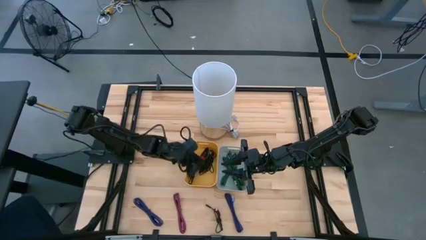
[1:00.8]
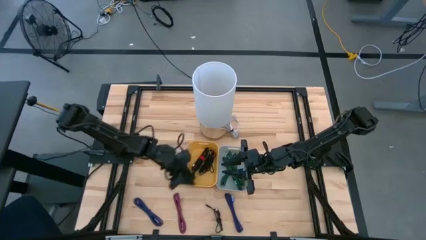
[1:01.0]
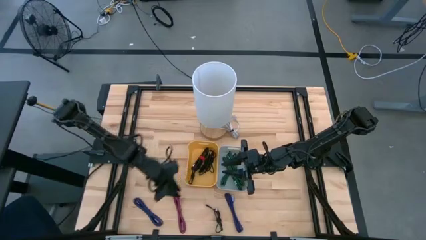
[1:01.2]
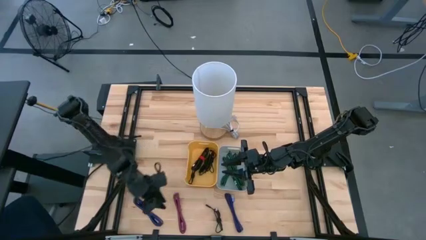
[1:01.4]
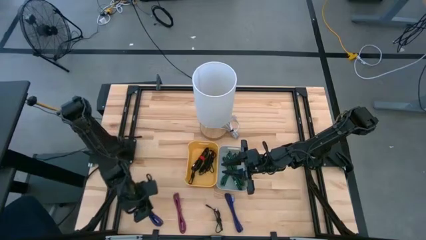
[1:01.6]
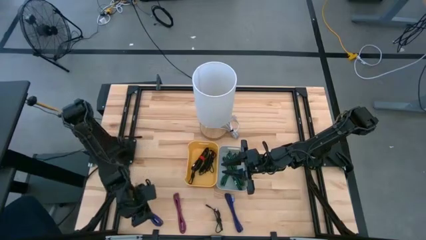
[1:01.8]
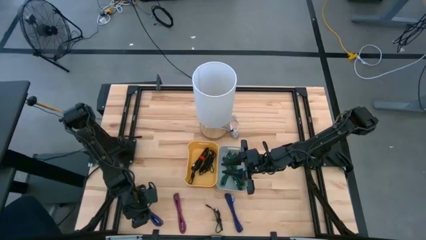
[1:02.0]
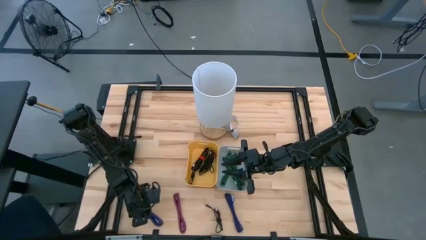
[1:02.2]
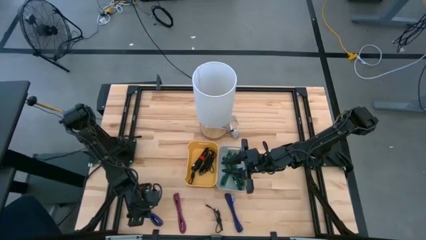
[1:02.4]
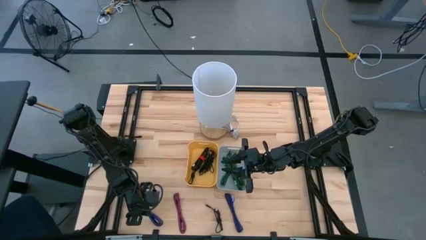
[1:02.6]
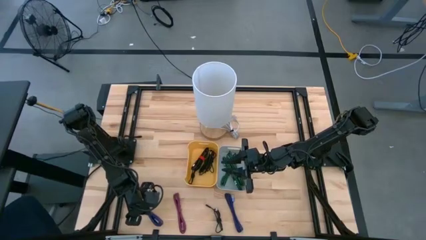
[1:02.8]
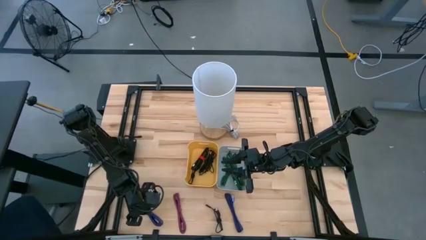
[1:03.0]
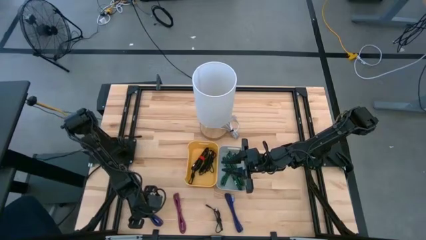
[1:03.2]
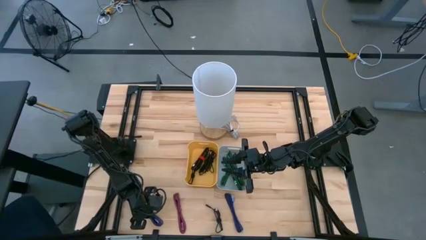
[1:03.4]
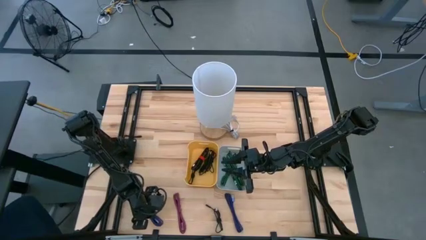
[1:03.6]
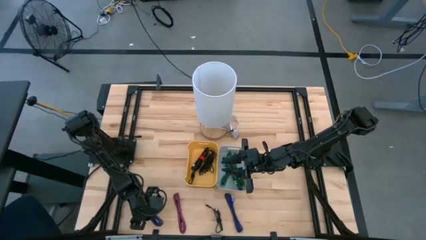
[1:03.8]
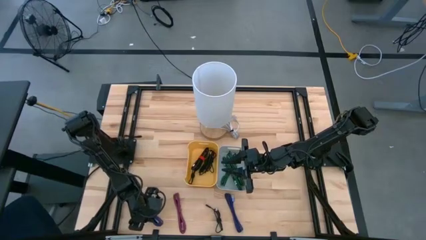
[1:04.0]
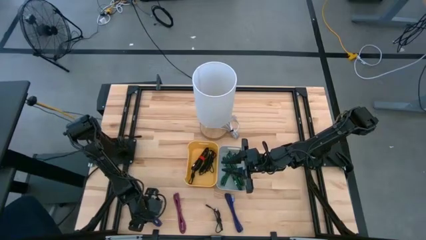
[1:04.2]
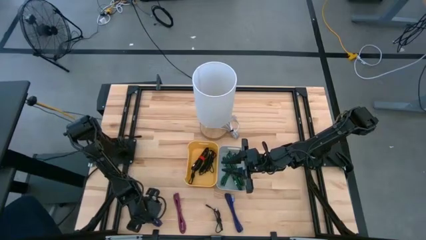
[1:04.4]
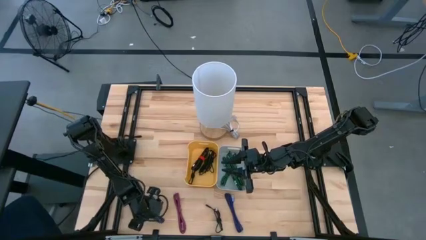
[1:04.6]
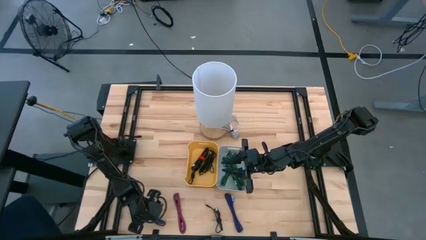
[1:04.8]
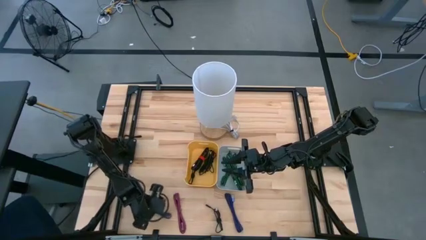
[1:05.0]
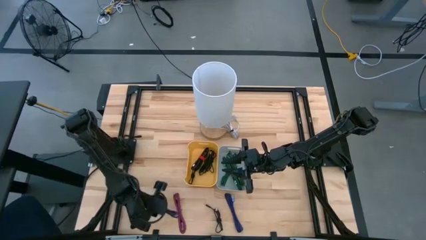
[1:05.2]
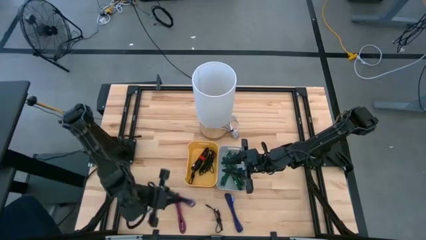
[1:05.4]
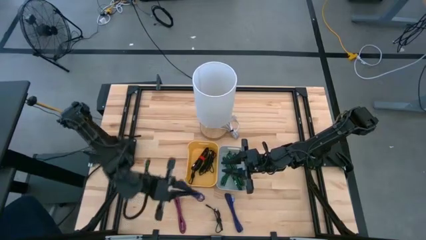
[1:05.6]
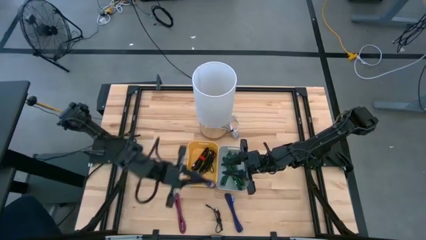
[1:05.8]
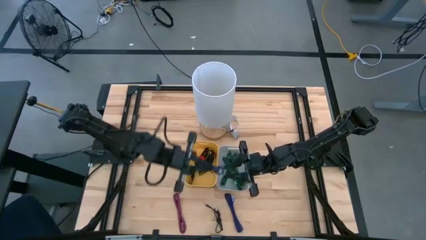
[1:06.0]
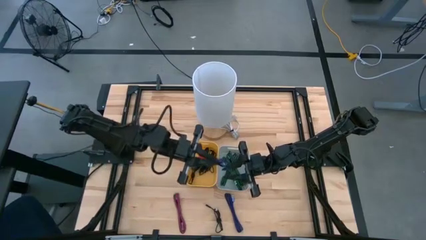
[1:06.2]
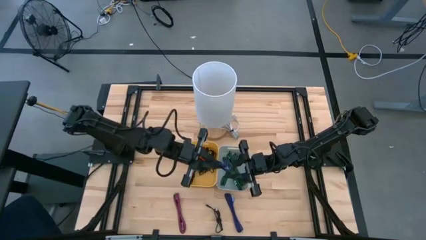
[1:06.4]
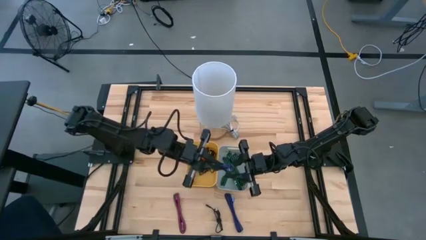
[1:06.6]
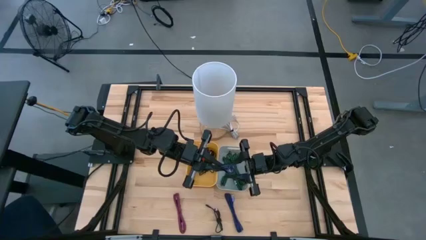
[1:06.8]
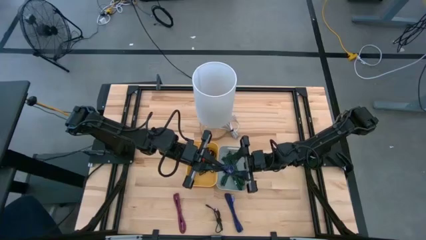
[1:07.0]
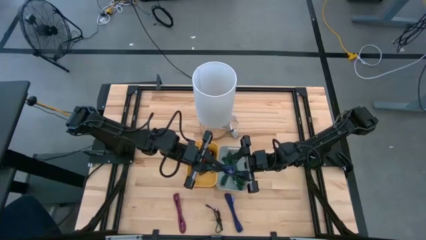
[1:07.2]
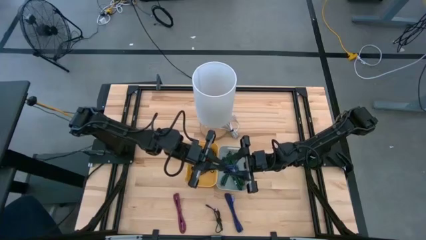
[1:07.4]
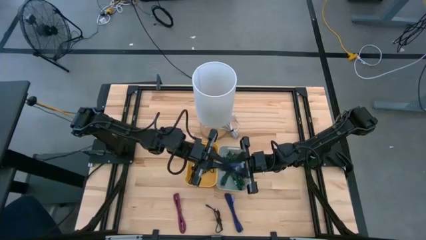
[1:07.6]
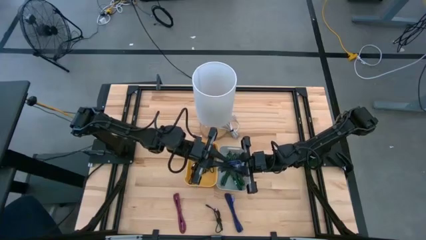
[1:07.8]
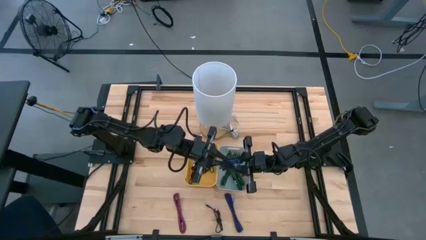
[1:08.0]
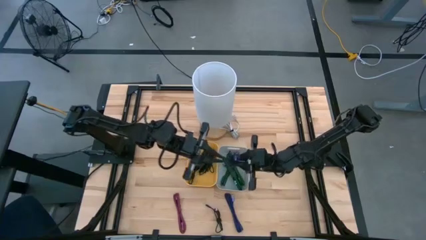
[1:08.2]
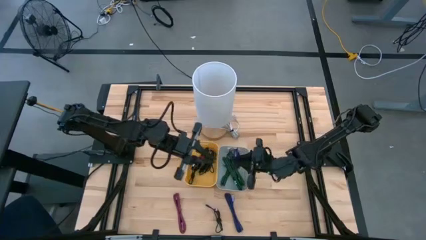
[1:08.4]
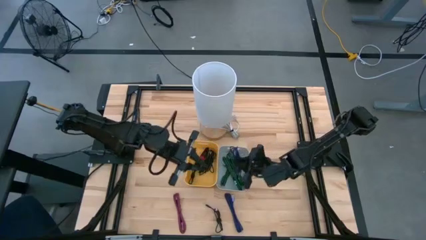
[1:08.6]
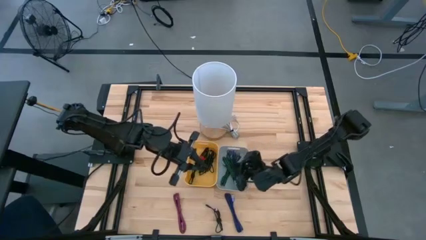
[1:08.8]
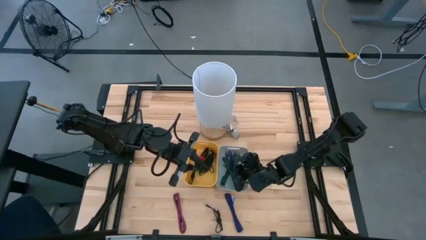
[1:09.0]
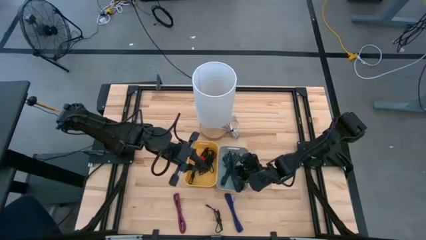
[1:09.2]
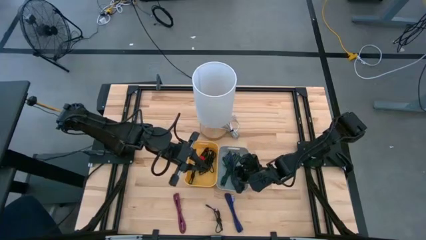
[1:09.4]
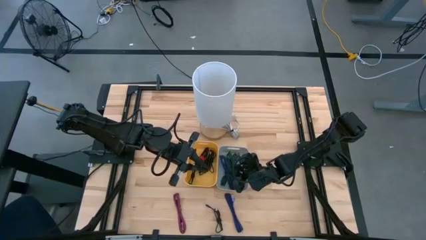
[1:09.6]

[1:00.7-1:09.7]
Task: Pick & Place USB Port
Put the left violet and white charger cable into the gray bin

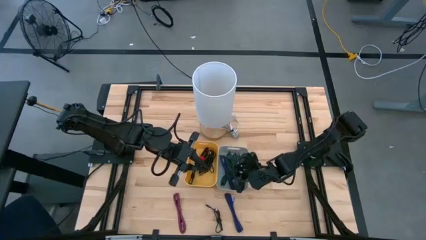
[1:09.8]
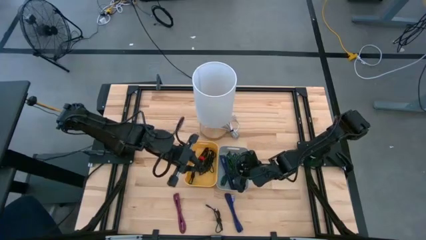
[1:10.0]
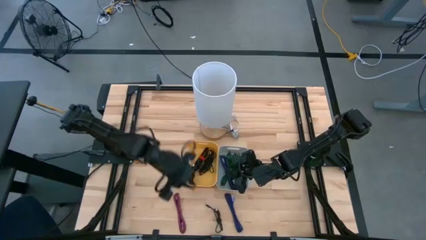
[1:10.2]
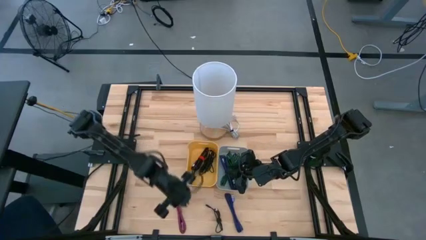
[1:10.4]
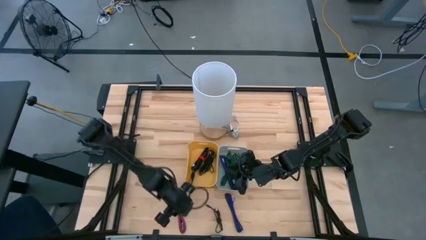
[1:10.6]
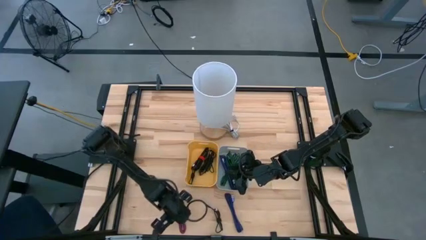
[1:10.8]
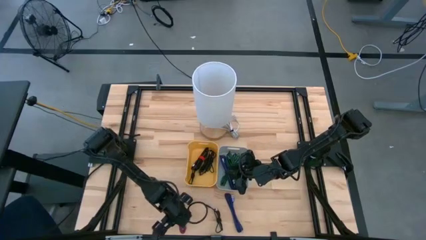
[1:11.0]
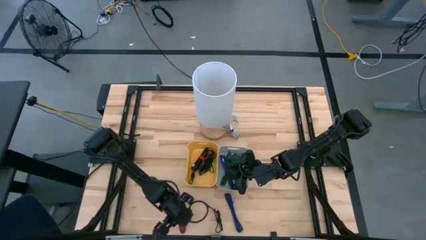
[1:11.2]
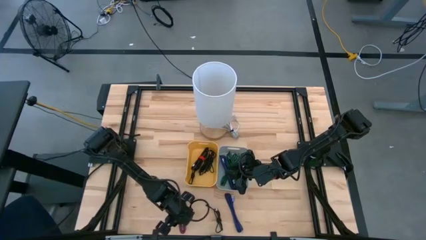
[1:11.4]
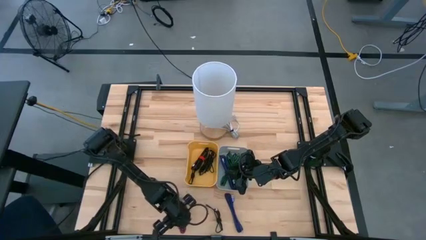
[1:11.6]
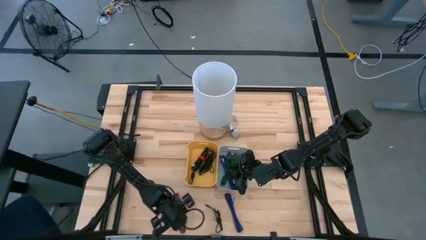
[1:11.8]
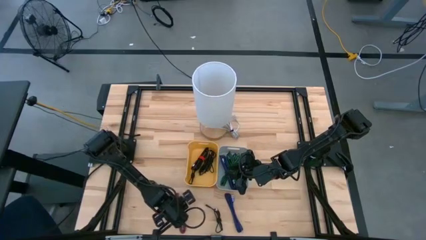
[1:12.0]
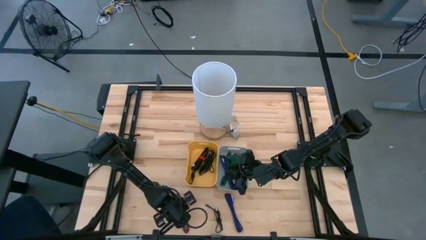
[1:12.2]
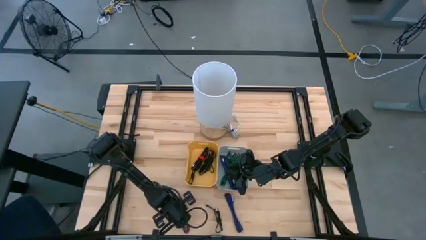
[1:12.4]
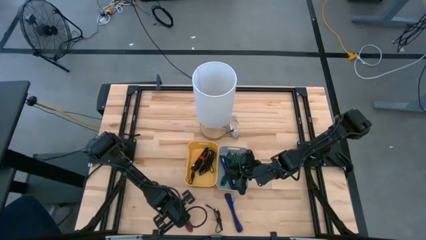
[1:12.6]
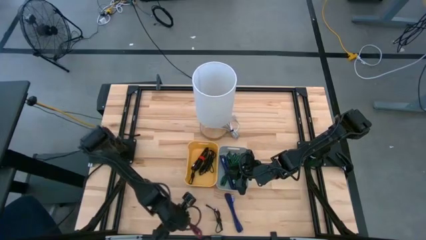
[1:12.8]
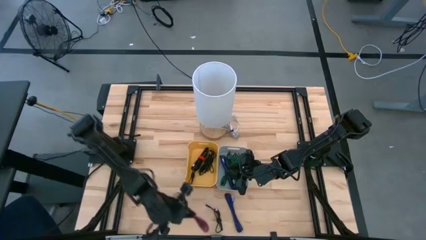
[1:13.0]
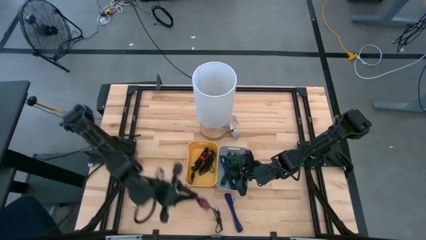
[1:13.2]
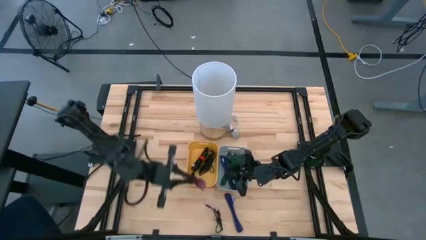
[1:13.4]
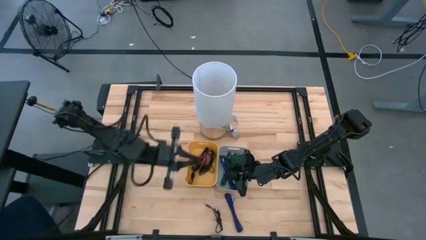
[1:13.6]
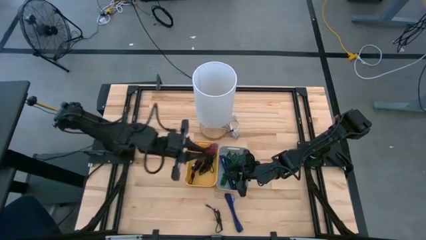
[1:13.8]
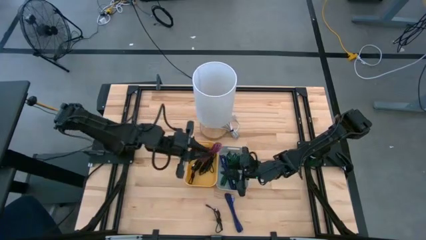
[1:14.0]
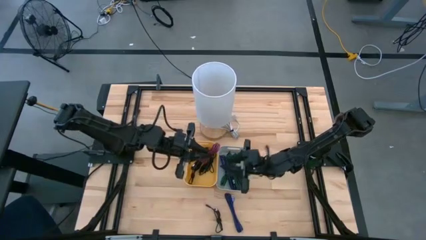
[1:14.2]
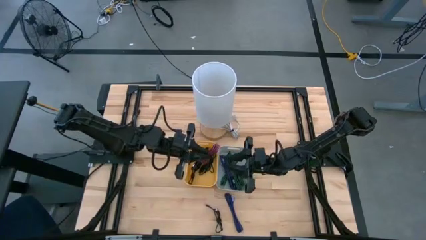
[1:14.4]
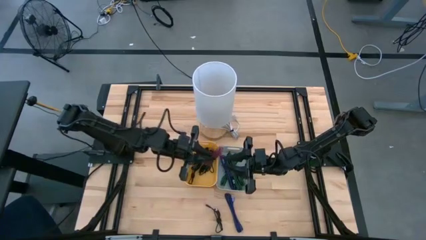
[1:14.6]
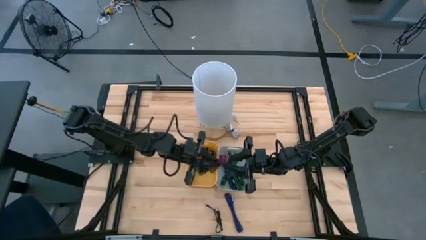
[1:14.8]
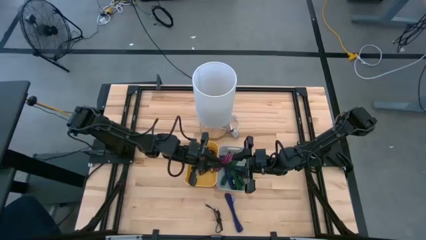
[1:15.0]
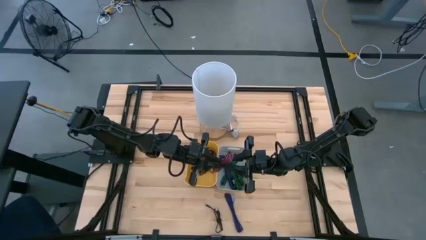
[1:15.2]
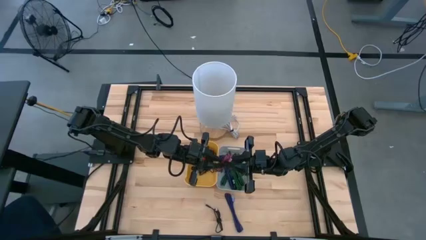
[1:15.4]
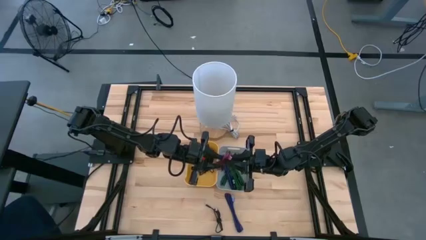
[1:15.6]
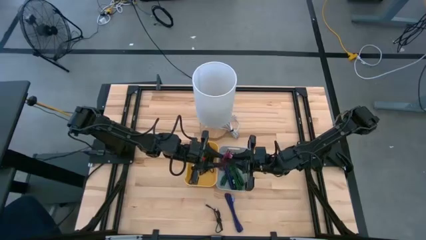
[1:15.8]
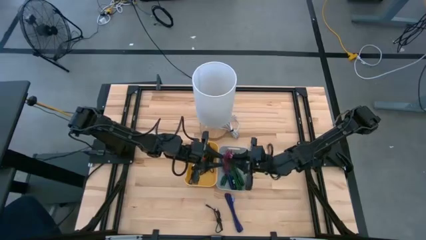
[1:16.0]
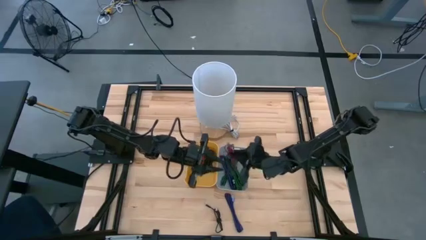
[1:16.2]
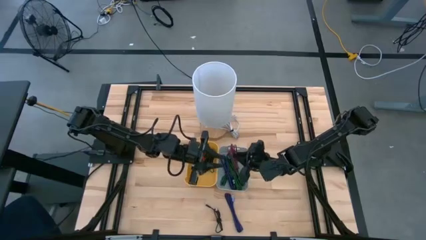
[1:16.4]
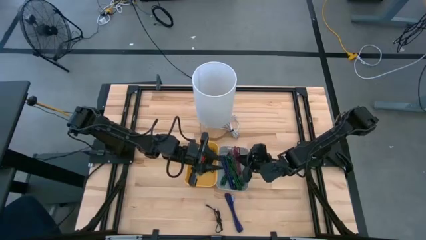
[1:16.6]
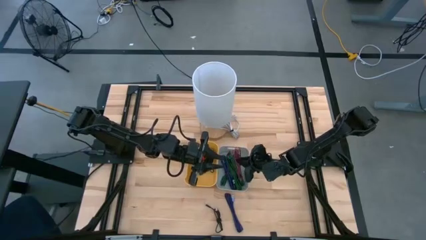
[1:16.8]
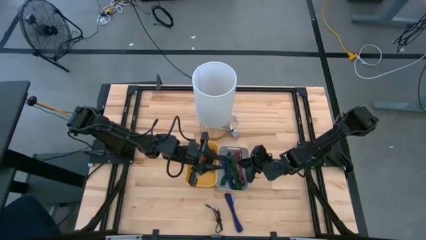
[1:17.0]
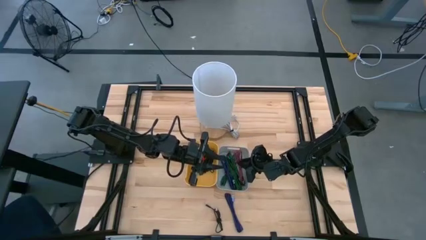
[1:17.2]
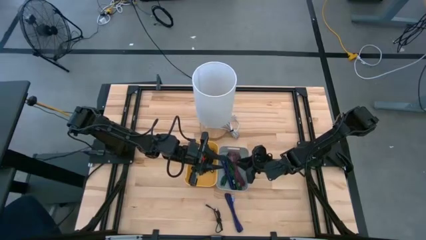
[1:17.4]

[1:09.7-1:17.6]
Put the pink and black charger cable into the gray bin
